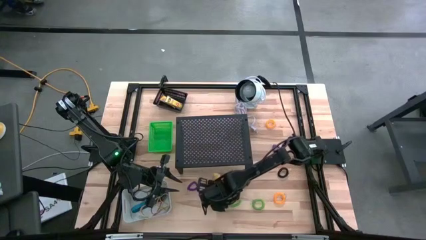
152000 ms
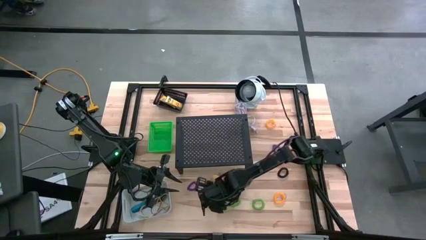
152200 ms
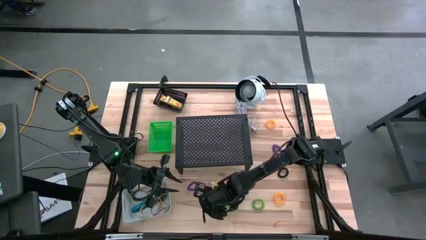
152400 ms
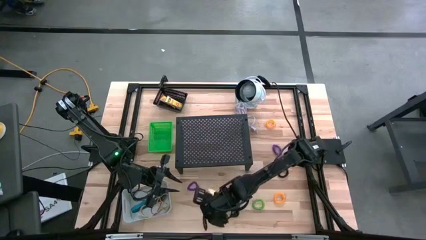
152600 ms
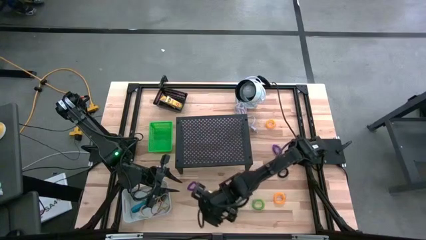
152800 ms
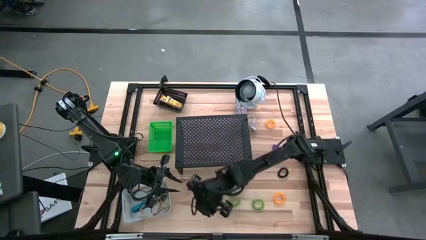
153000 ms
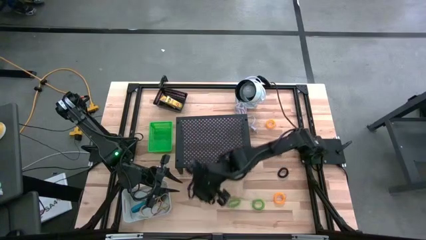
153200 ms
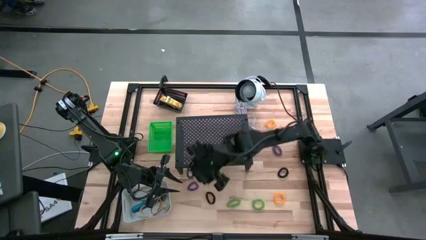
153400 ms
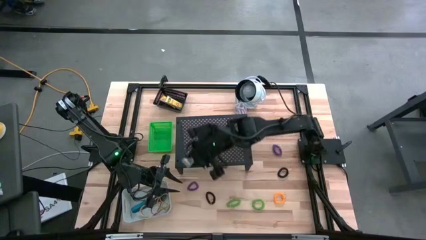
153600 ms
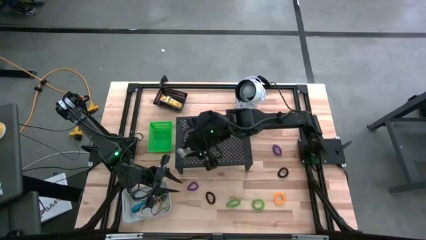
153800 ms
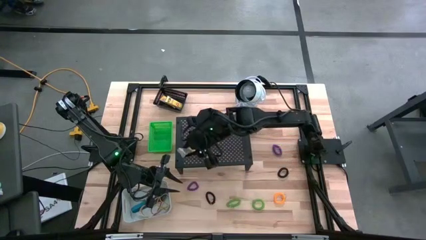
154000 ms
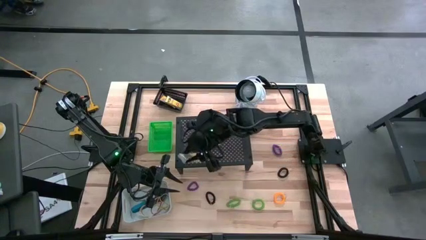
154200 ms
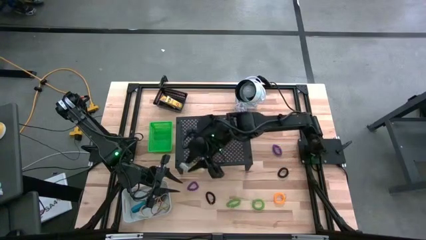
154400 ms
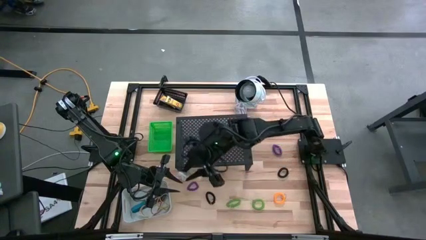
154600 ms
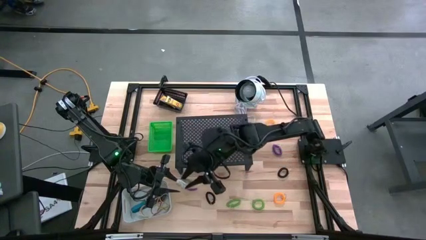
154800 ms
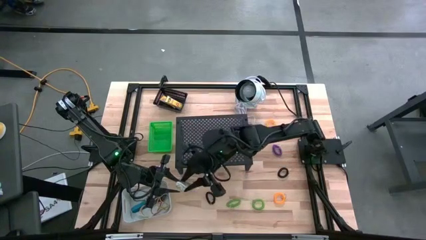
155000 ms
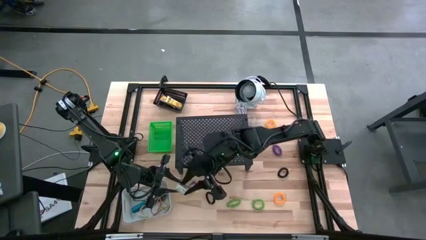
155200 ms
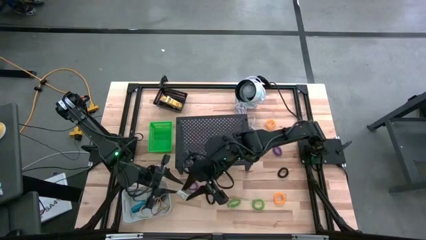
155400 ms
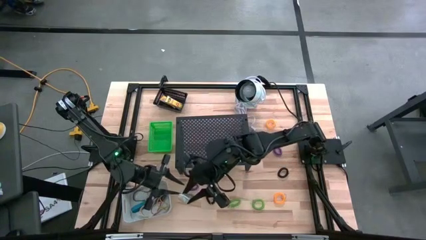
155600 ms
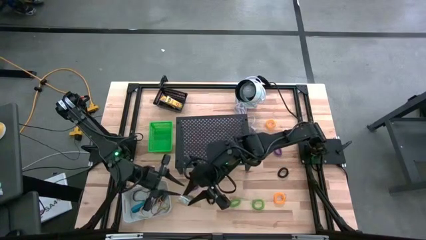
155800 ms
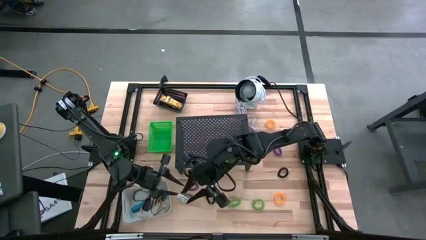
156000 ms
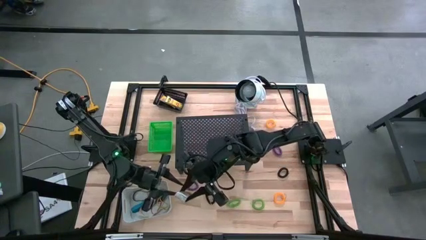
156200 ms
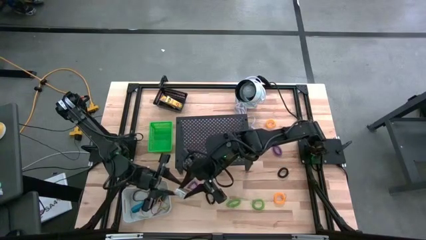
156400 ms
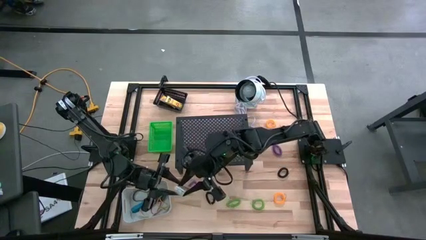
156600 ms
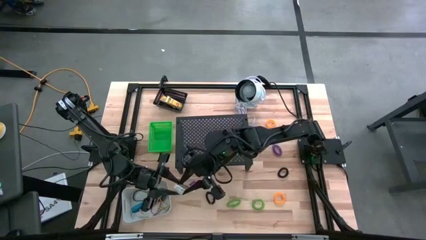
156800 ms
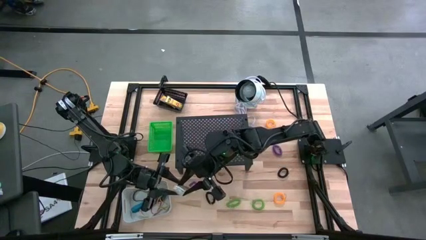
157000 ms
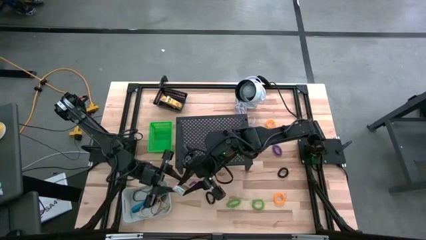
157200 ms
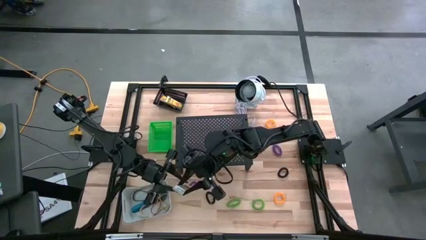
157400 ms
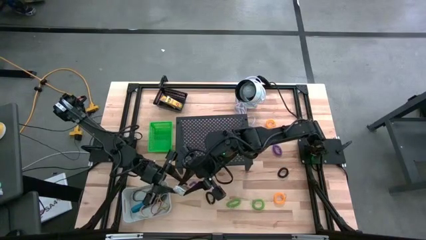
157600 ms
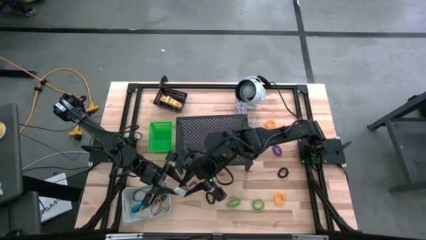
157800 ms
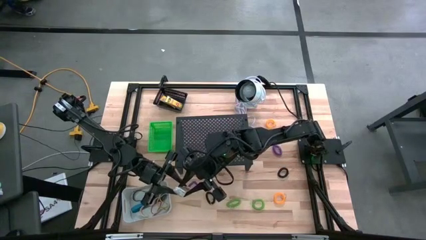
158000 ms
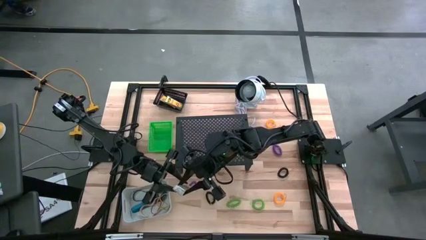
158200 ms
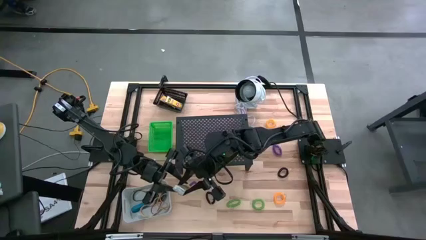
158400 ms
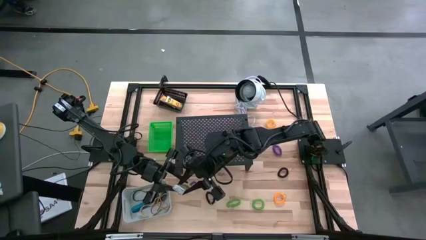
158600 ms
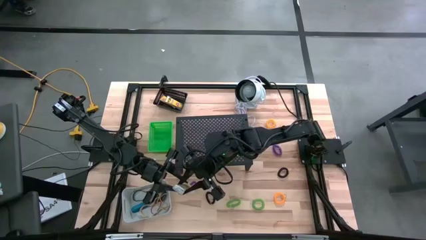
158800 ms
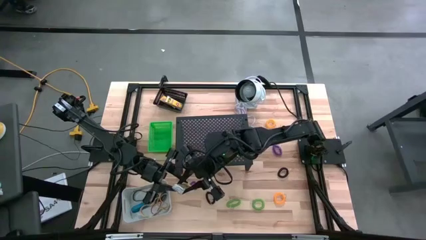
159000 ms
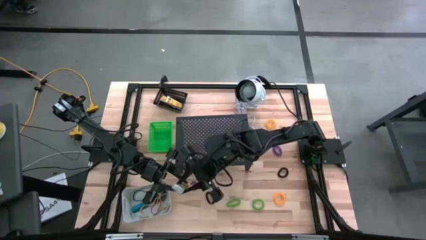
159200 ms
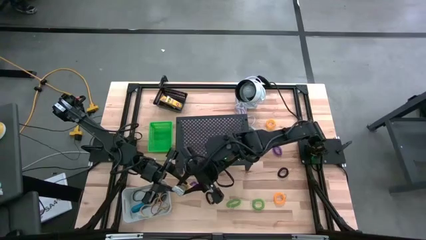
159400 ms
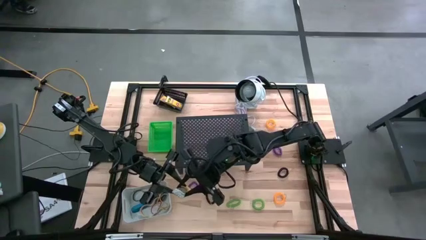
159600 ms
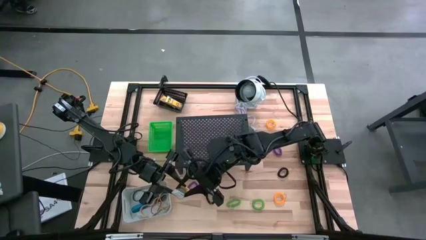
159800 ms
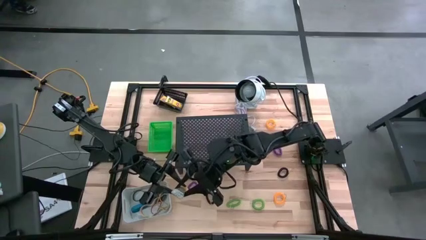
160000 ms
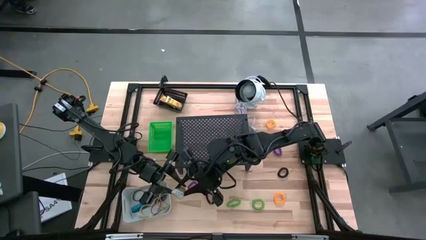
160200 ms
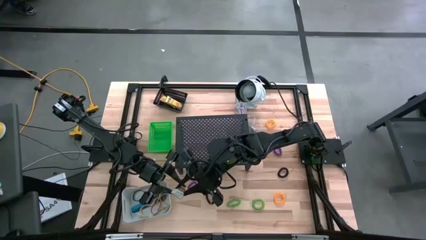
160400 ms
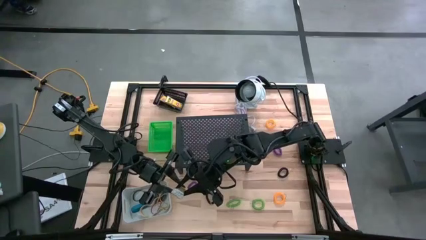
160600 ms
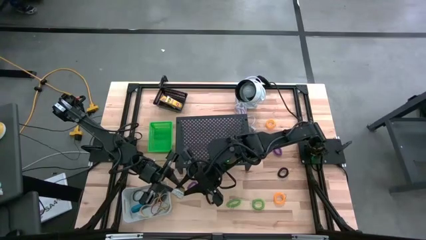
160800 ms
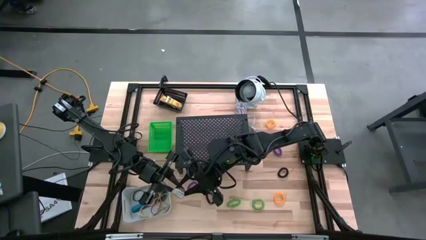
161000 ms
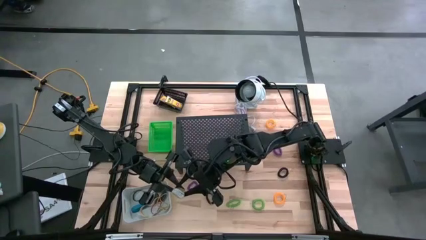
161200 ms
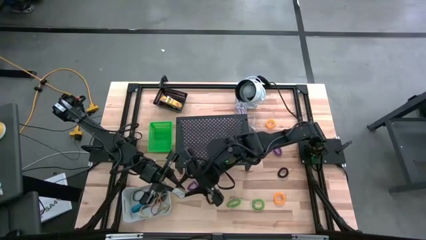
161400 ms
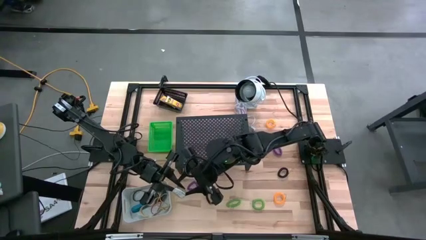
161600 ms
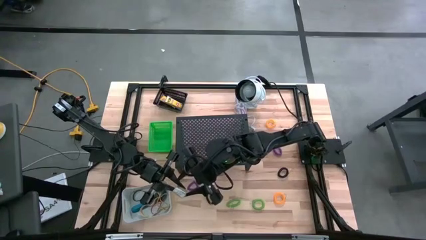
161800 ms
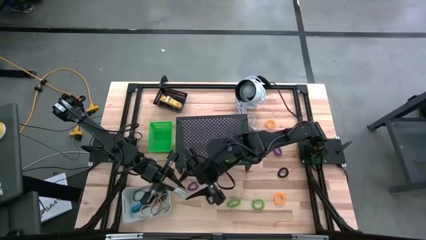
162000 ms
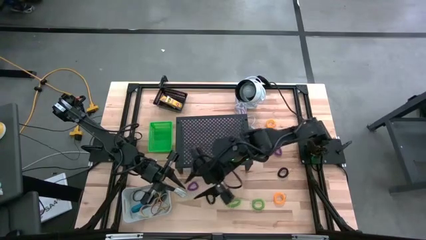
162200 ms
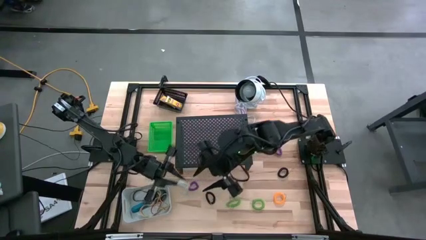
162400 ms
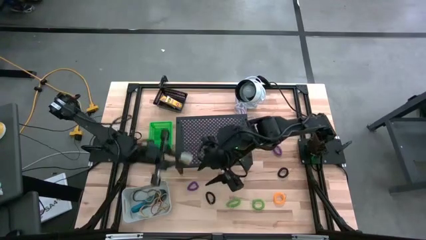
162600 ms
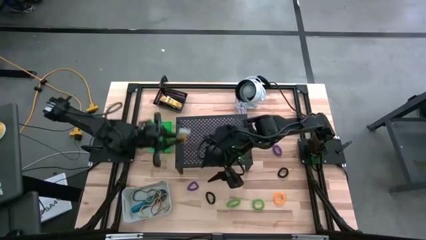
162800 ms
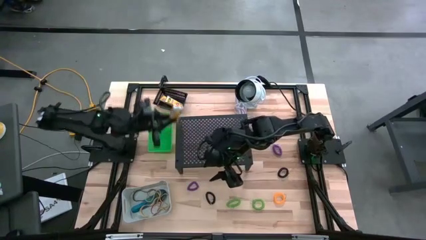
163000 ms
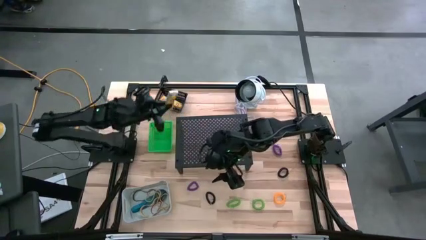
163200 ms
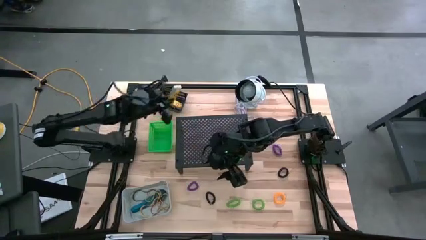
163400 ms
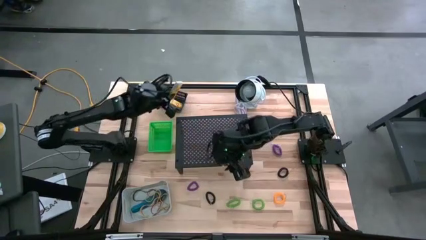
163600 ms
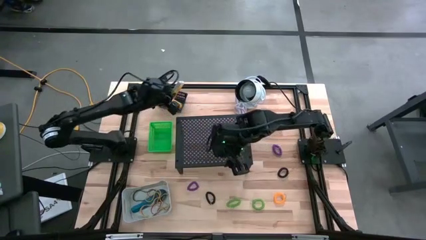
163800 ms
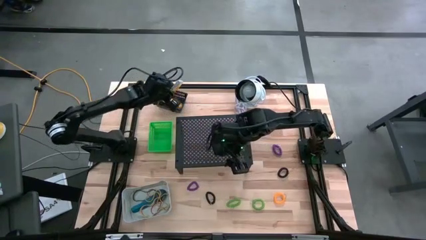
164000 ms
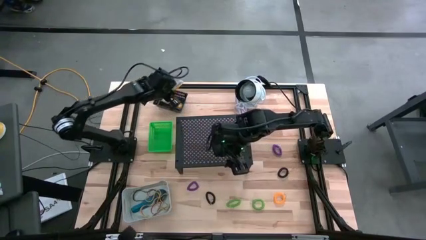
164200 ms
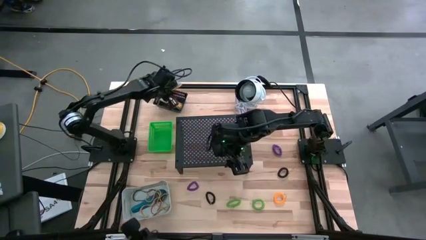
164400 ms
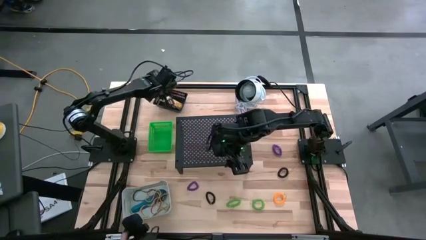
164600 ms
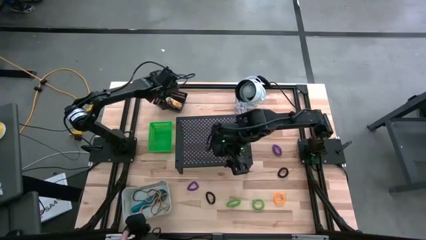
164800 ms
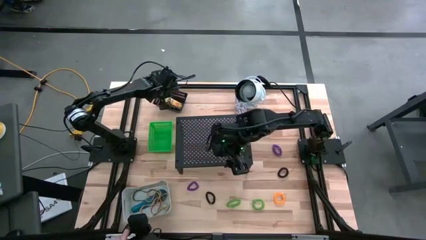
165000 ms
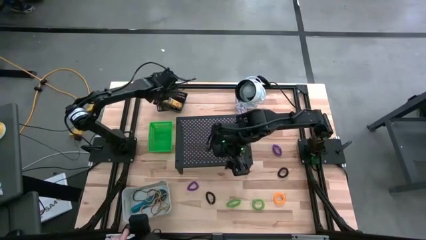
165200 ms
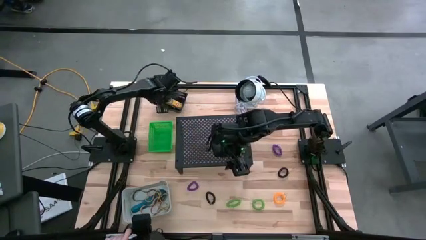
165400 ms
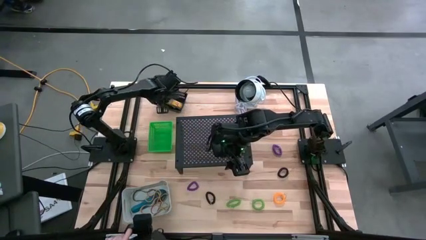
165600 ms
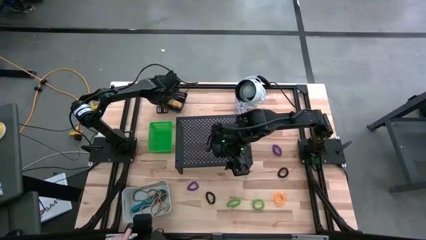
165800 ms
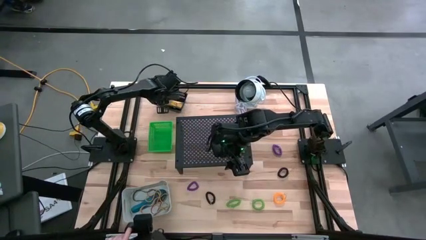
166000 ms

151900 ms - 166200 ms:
Task: Pick & Place Office Desk Supplies
Put the crayon box into the black bin

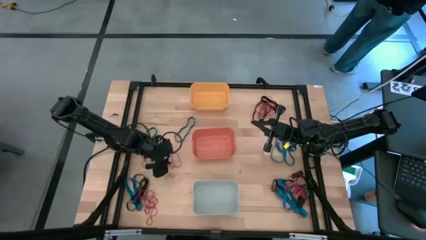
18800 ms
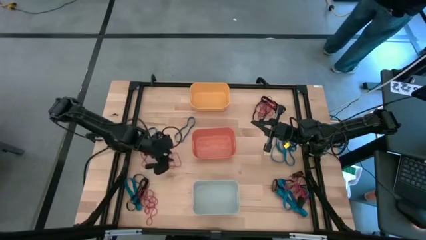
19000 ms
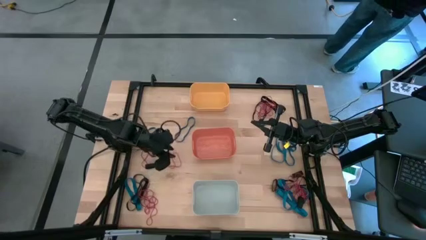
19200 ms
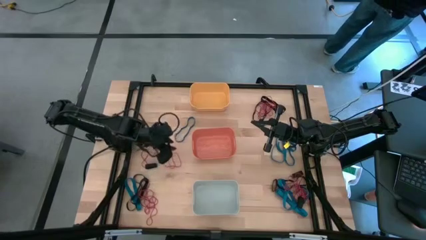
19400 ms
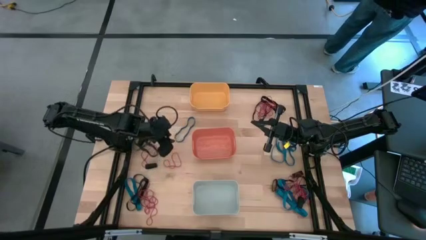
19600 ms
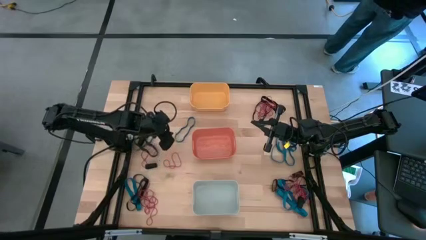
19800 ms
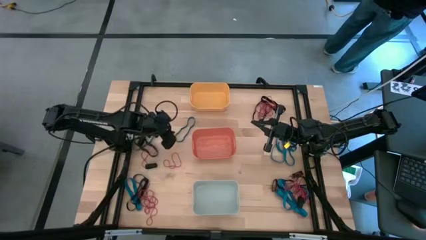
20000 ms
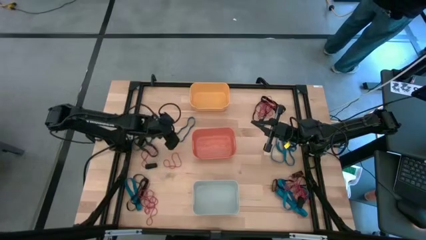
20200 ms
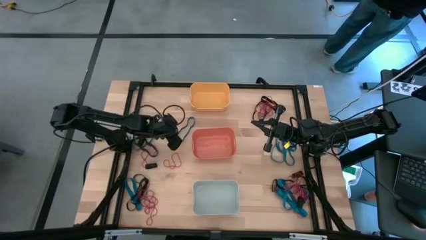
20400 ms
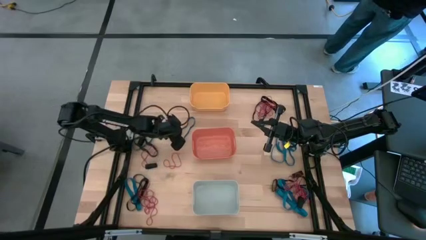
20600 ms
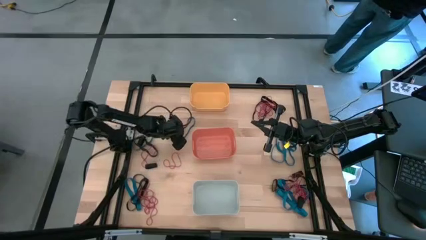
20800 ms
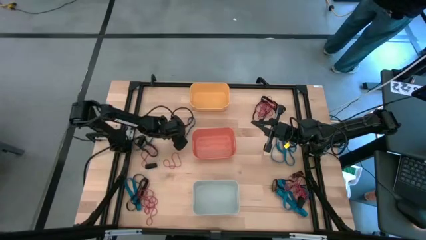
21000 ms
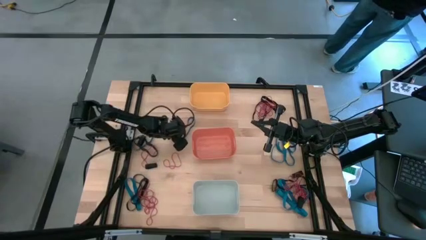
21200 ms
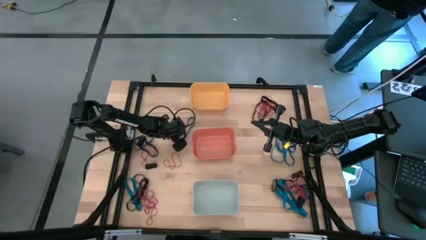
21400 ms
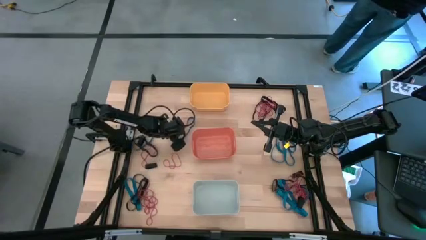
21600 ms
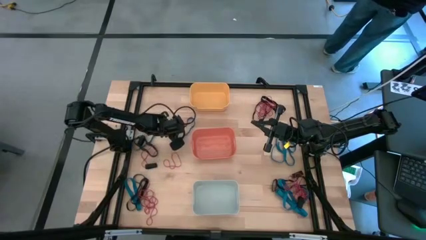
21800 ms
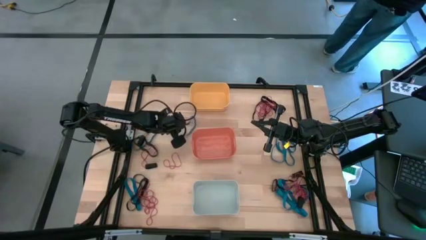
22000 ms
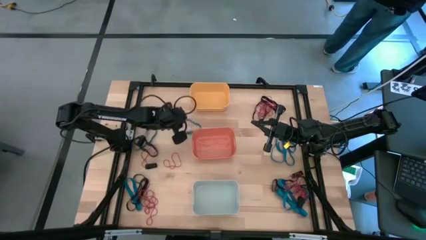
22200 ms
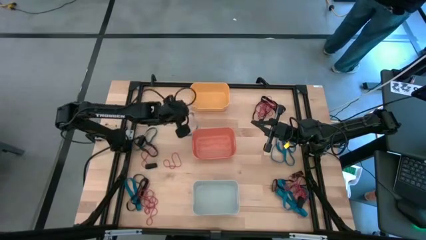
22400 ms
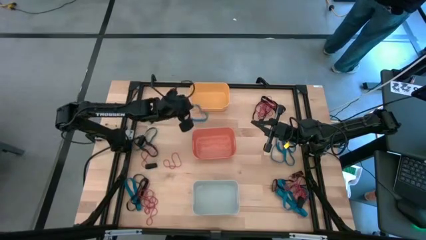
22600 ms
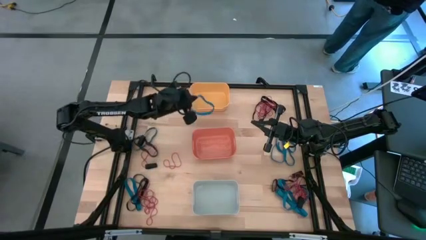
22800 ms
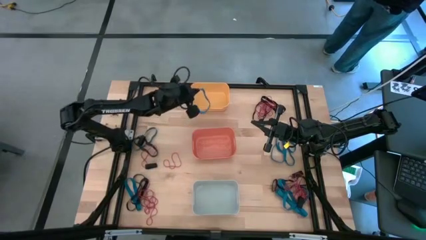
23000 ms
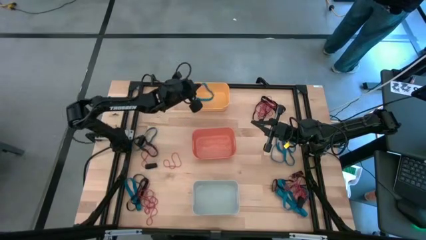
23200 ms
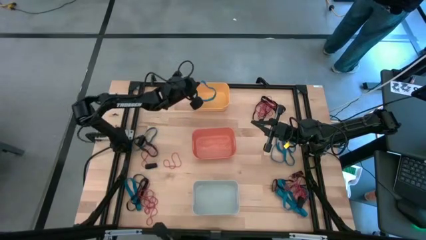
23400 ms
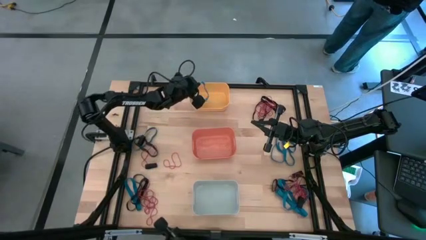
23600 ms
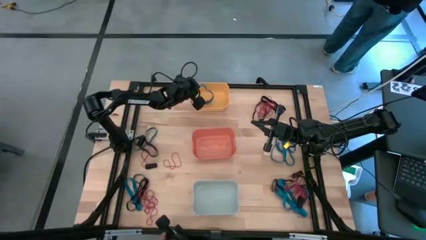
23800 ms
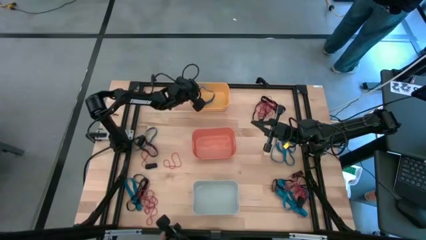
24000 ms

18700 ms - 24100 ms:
Task: Sort rubber bands into baskets
Put the blue rubber band in the yellow bin
